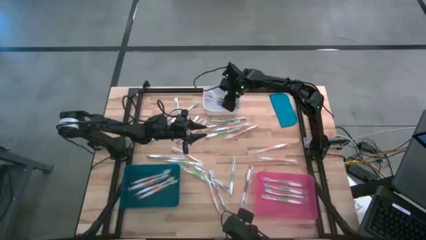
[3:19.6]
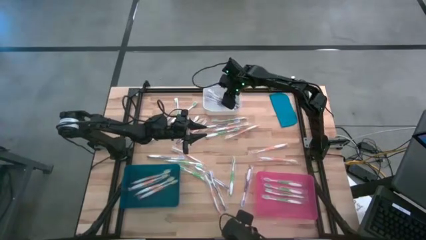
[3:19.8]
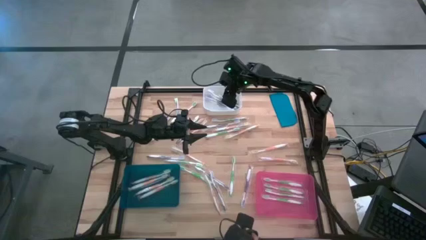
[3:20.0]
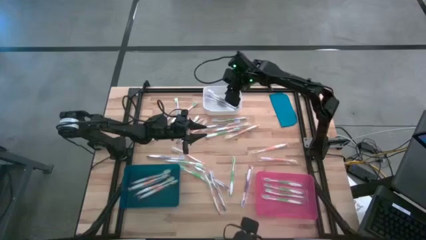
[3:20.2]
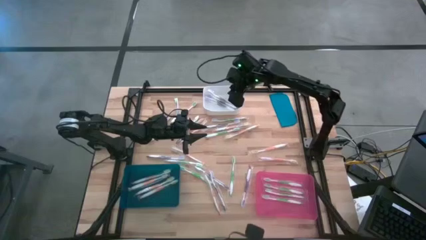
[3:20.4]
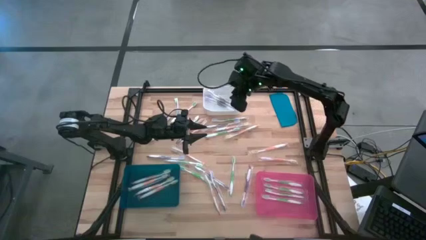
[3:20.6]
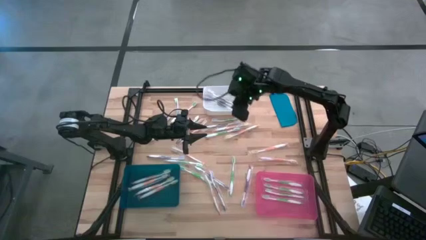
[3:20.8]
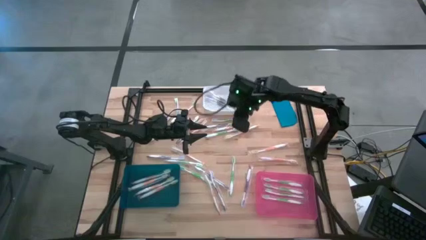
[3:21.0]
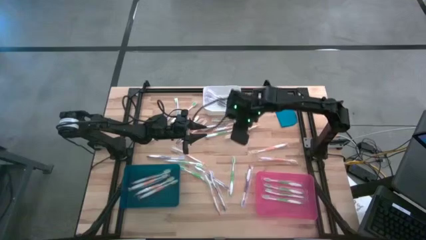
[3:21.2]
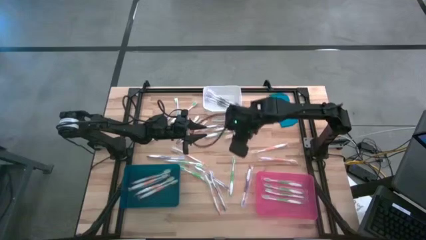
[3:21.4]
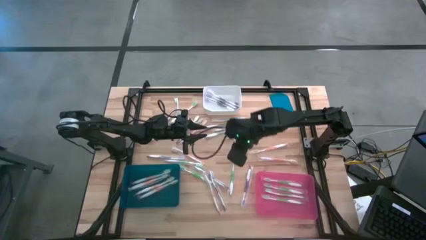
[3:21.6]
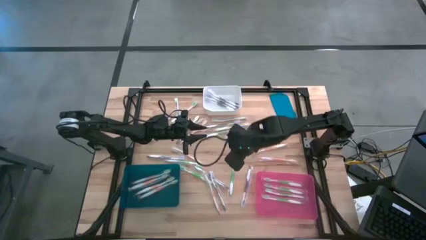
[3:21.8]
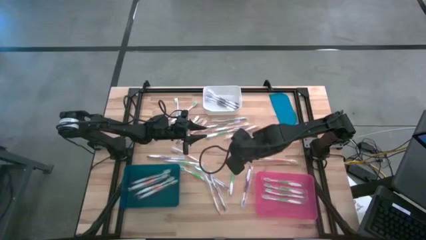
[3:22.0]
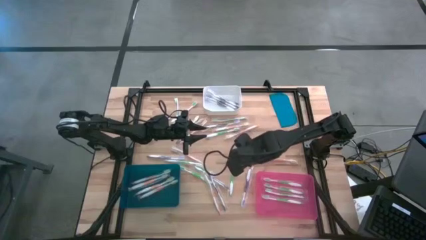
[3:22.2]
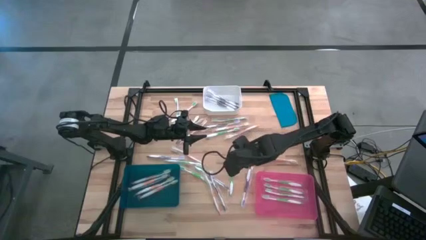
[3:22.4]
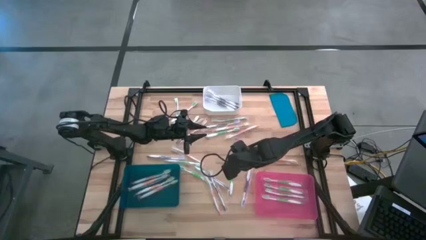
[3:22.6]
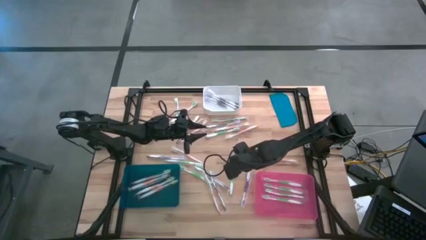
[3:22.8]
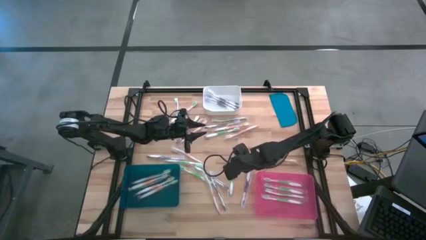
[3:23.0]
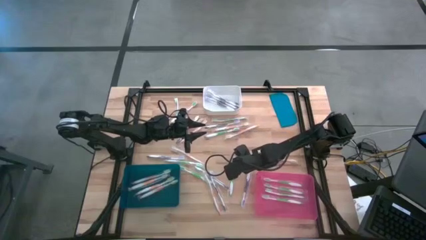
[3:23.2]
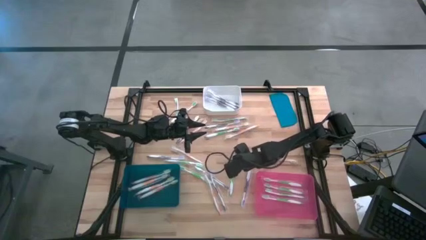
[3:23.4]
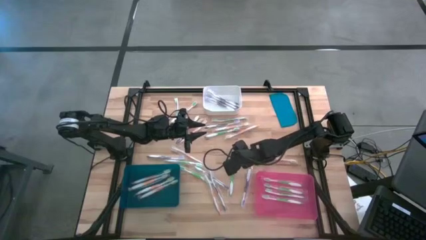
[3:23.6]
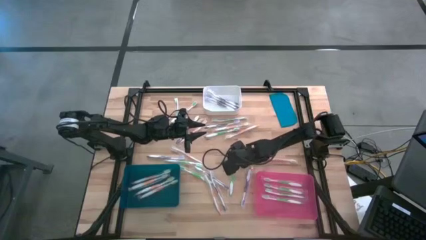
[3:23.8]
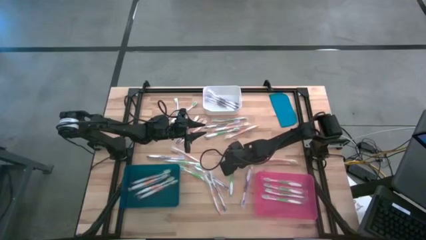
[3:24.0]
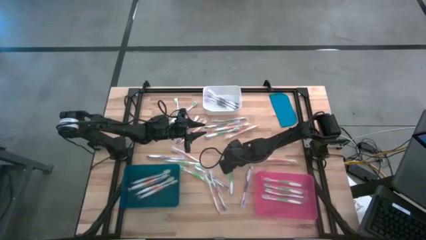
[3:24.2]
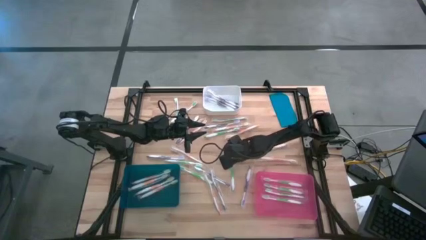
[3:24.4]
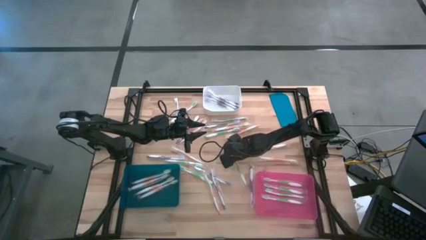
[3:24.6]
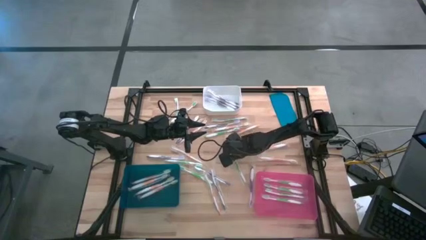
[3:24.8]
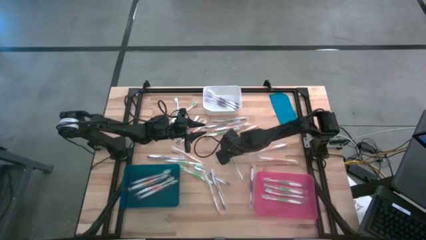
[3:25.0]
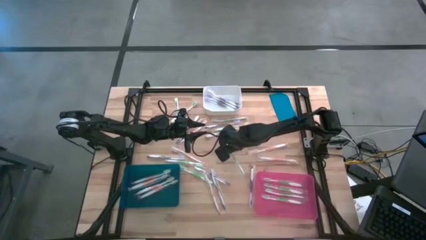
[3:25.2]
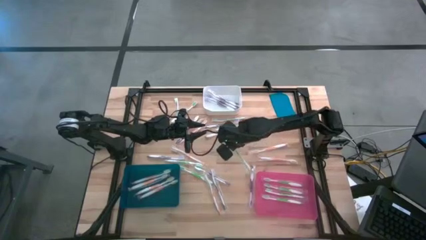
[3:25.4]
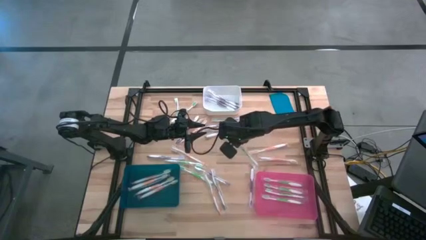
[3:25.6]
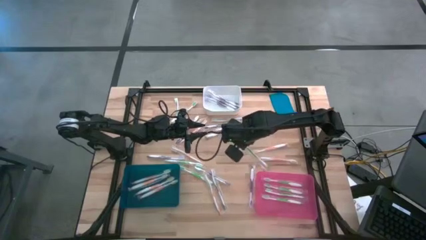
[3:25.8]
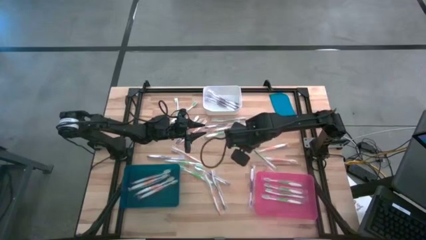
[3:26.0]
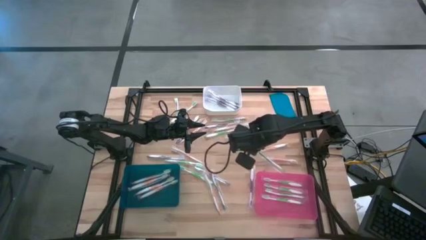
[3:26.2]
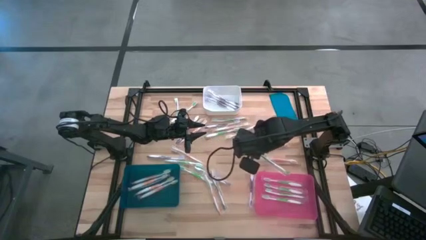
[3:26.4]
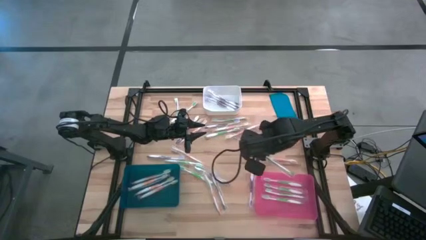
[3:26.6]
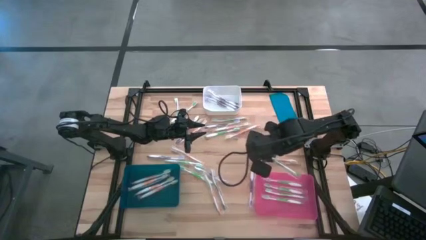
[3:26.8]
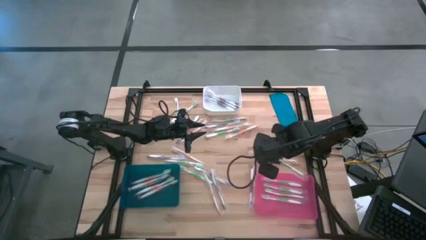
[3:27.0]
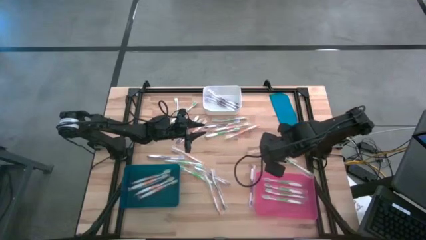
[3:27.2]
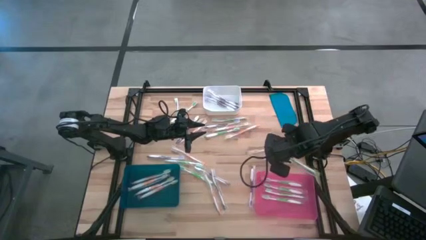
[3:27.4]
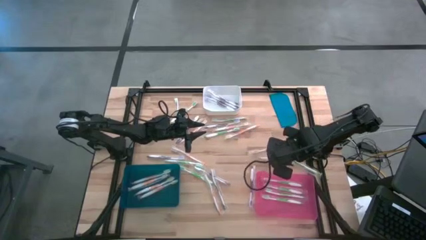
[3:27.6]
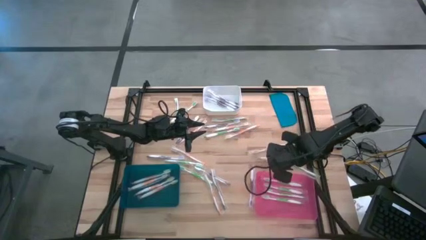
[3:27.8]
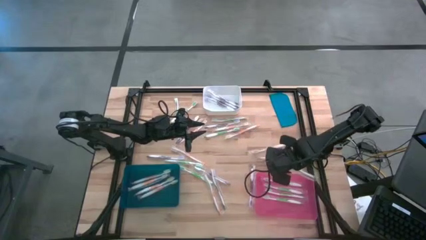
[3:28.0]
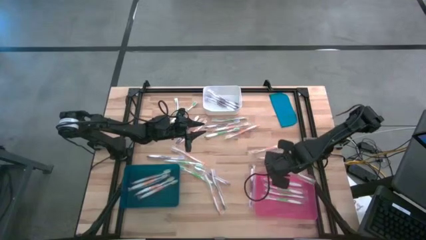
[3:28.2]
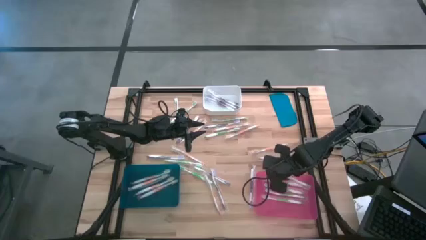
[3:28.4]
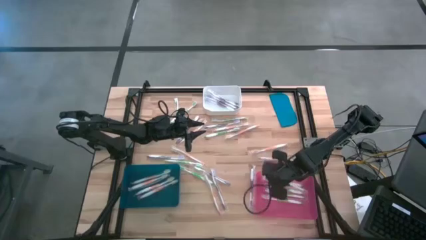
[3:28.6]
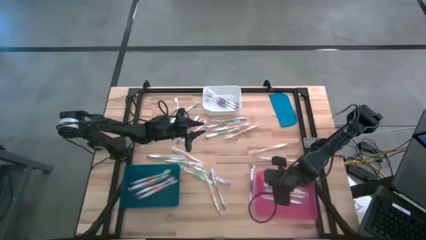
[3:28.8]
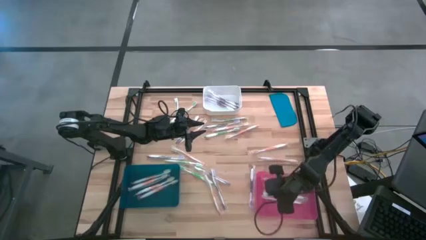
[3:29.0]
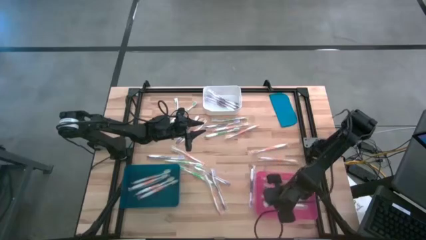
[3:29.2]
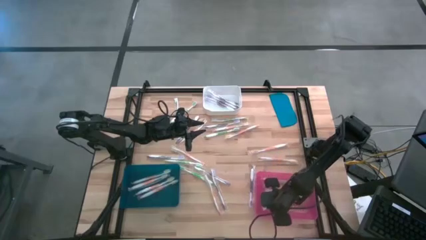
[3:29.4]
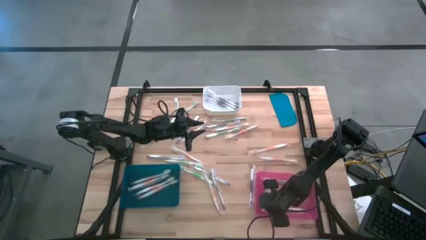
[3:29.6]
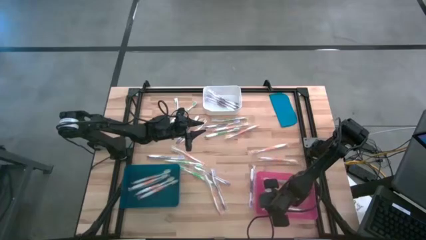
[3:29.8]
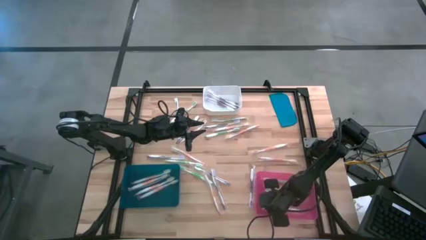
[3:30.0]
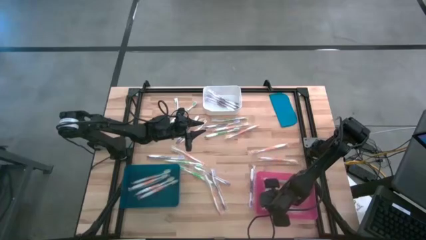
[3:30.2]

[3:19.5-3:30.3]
Task: Pick & Place Toothbrushes
Put the green toothbrush into the pink bin
